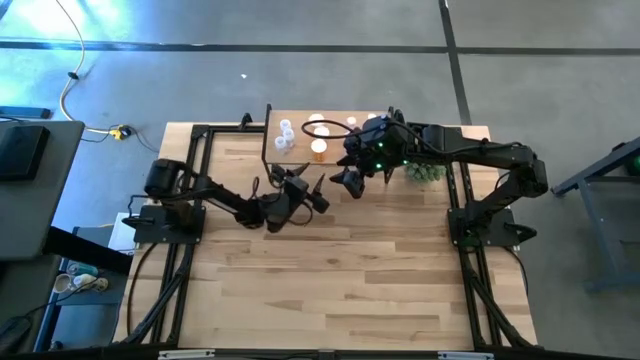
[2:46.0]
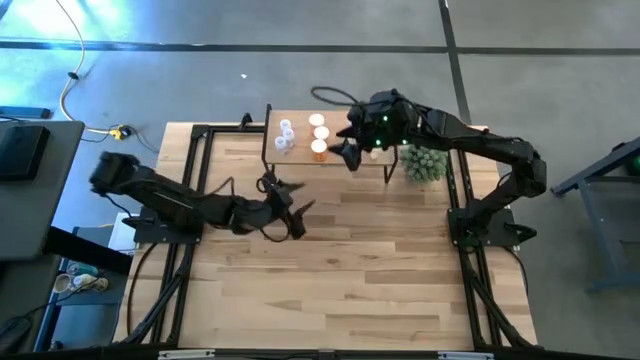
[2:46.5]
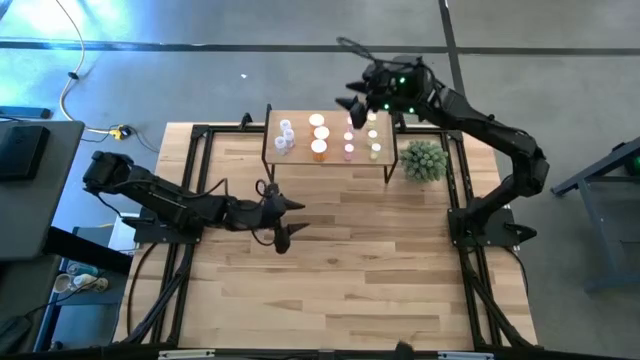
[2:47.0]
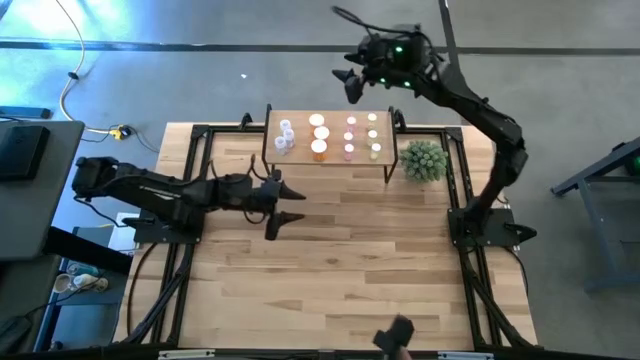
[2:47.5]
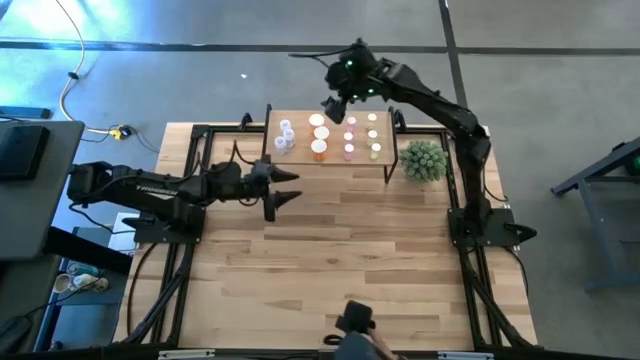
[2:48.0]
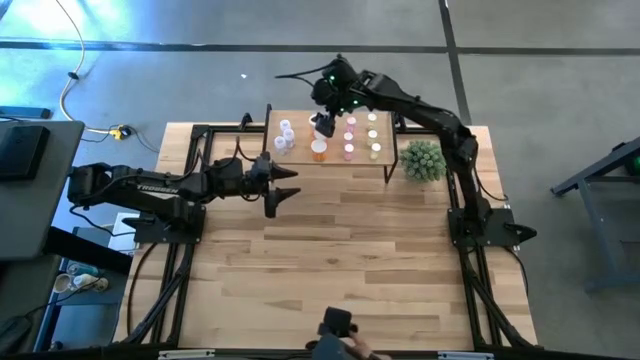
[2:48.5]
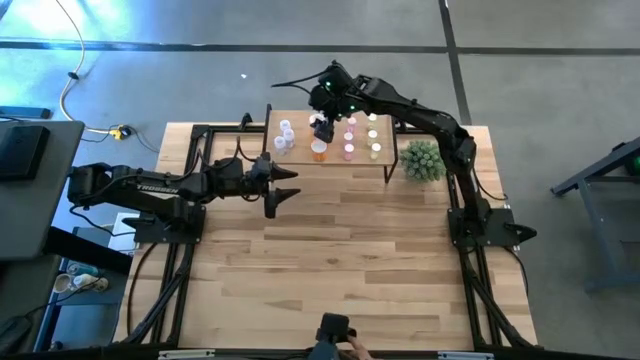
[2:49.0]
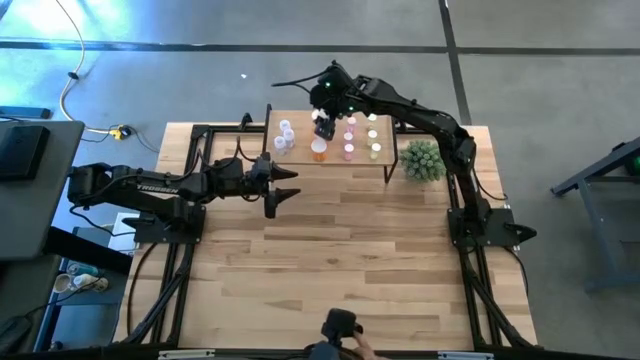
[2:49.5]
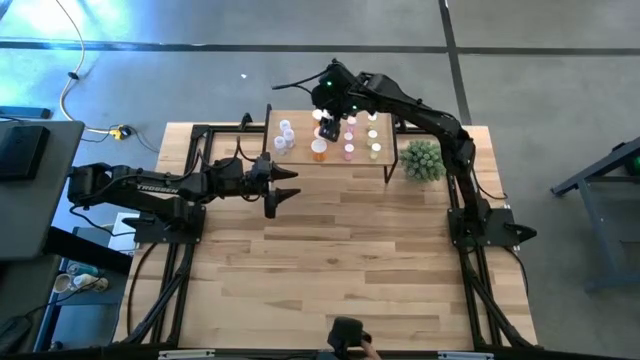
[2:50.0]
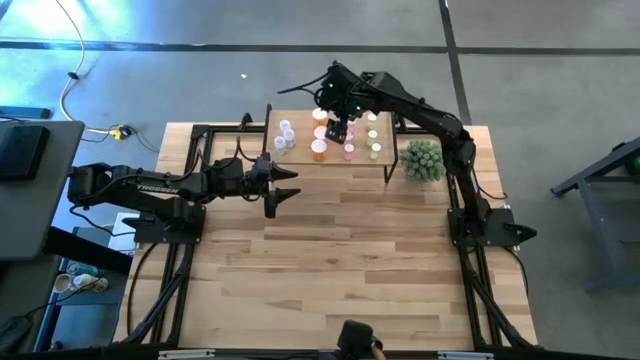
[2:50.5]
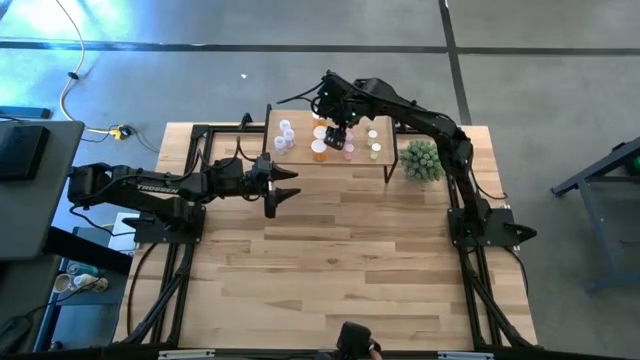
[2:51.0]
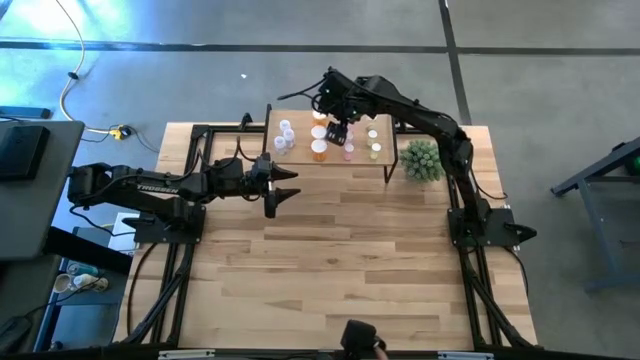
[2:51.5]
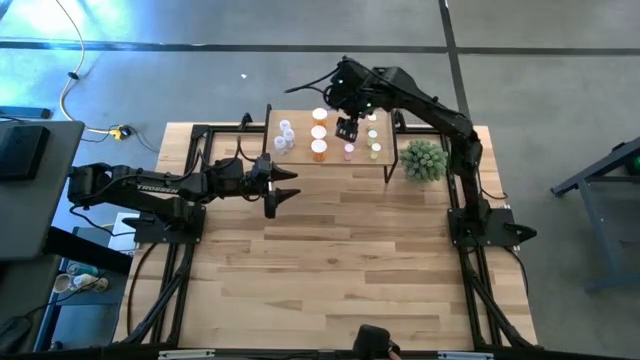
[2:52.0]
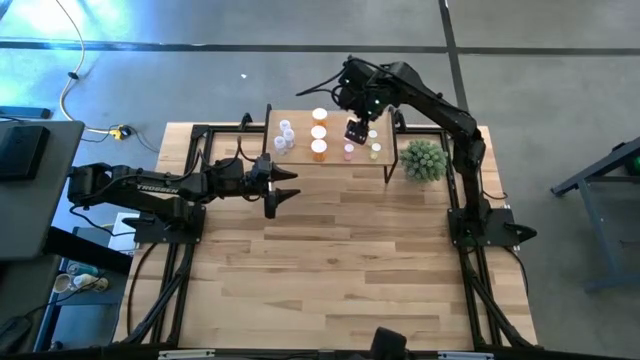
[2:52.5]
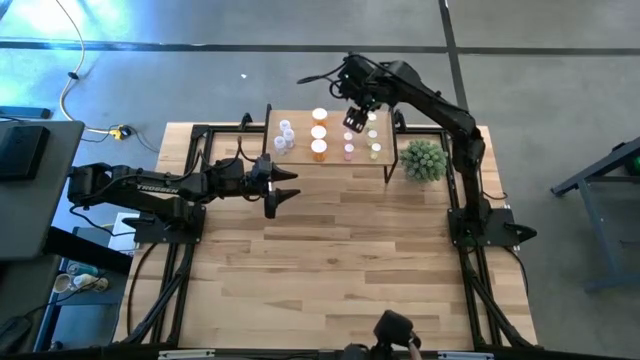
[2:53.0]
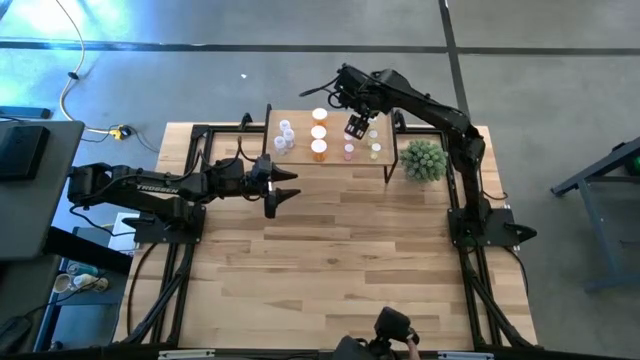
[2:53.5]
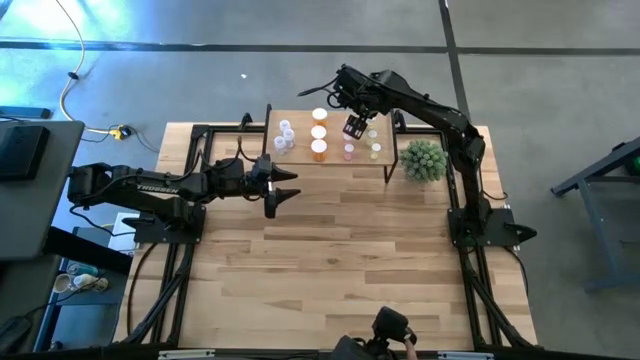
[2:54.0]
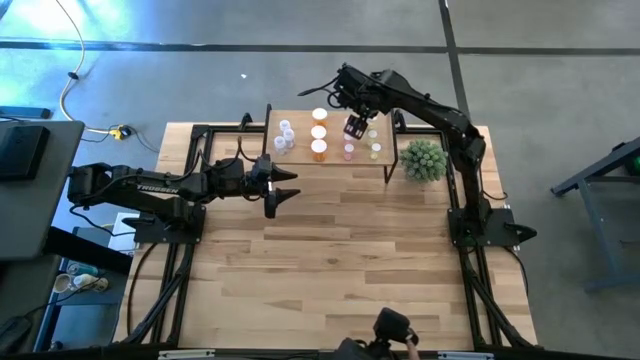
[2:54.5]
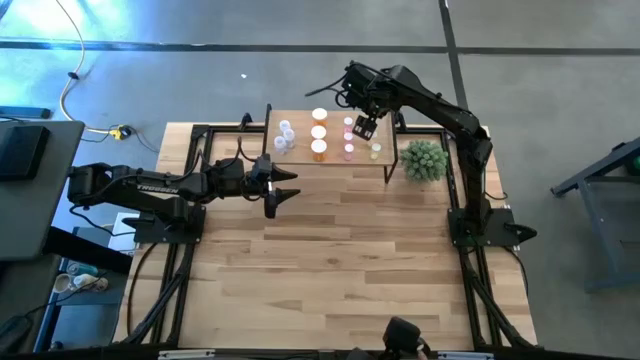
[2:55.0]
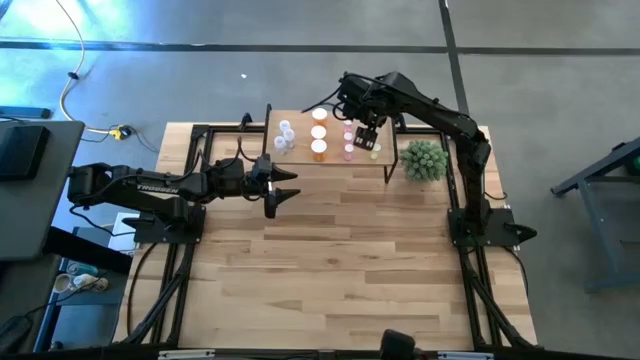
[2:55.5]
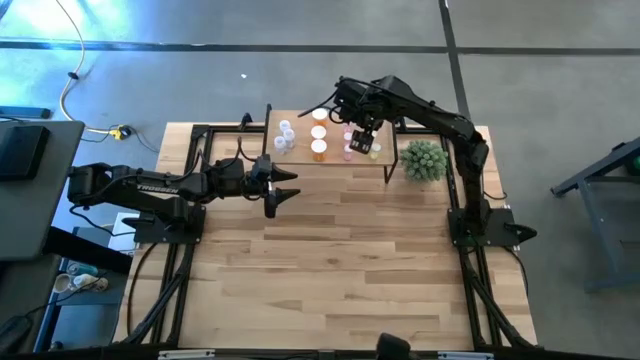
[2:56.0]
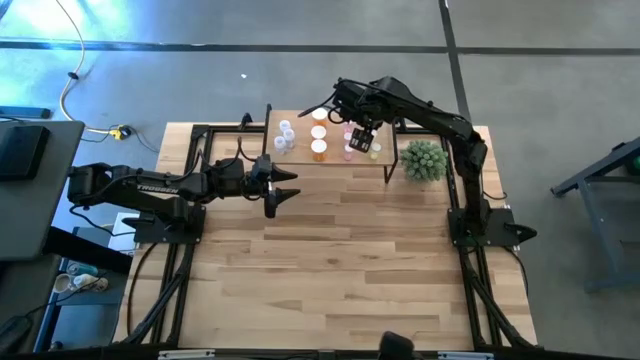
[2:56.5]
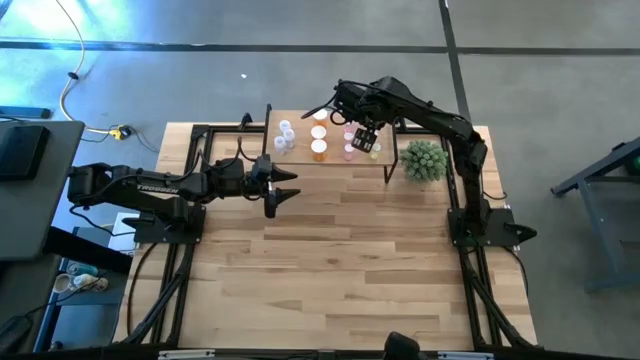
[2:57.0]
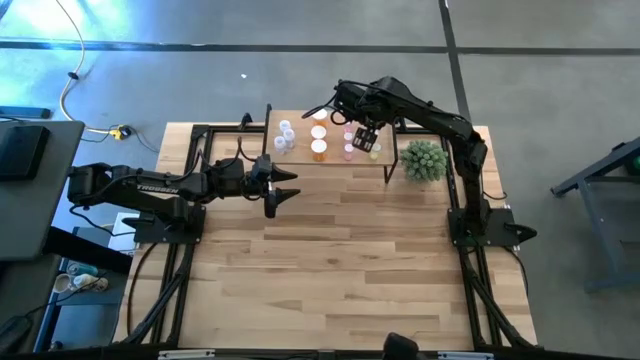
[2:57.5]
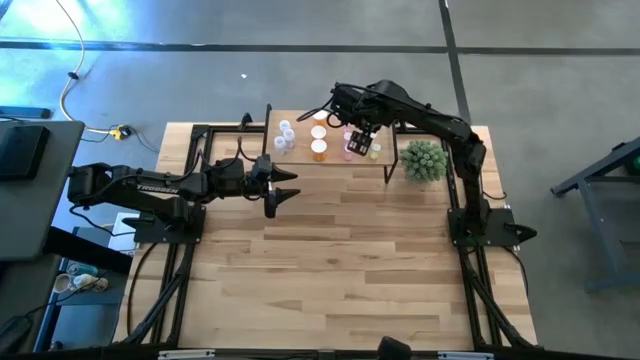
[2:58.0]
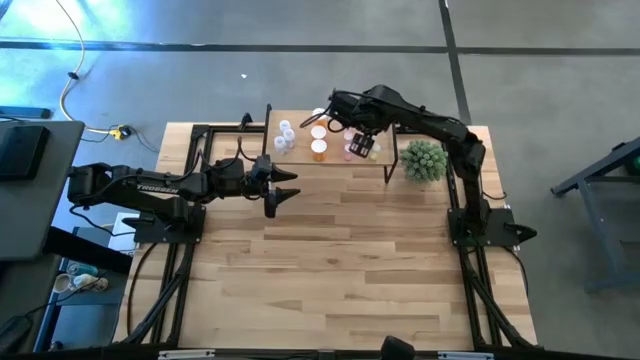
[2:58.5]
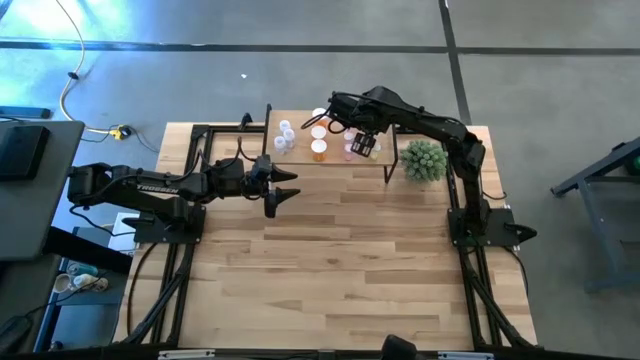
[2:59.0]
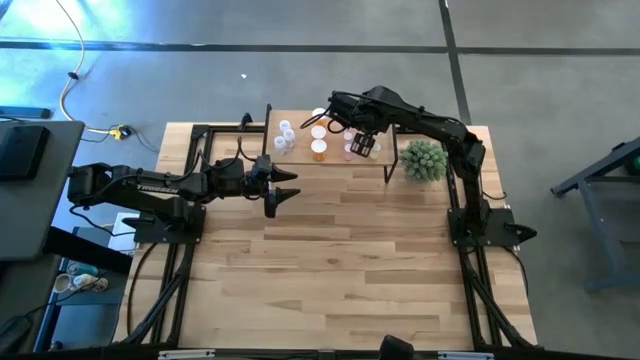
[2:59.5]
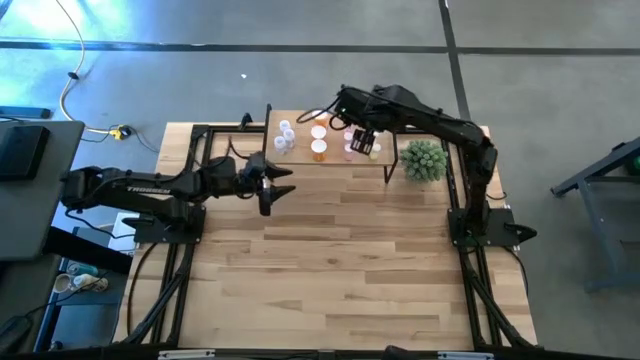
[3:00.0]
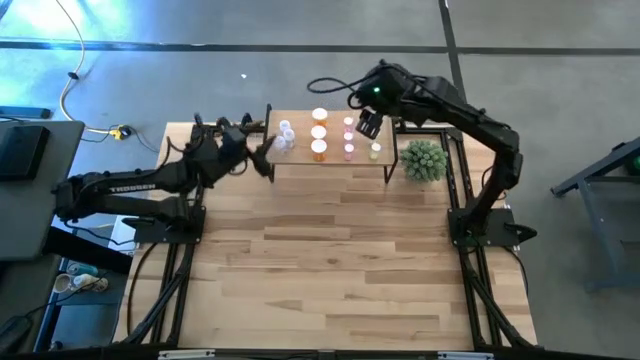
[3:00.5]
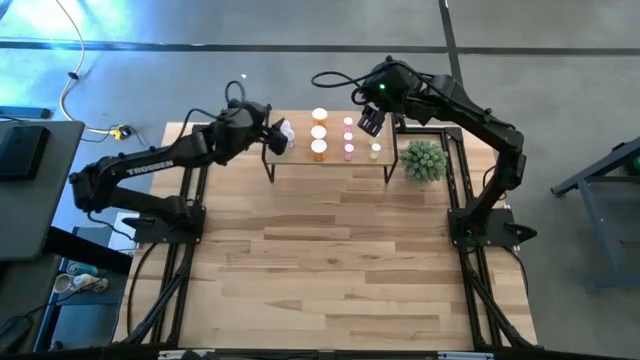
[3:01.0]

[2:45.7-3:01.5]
Task: Pick and place medicine bottles onto shelf by color
Adjust the colored pill bottles on the shelf

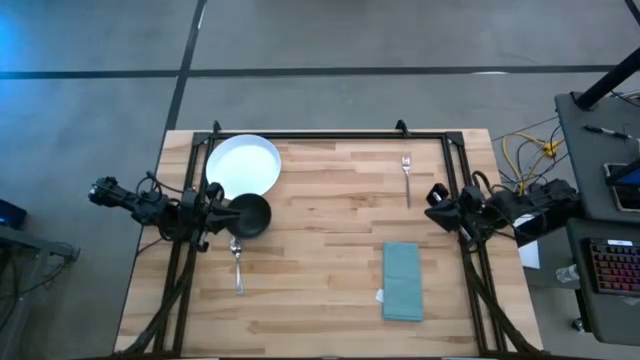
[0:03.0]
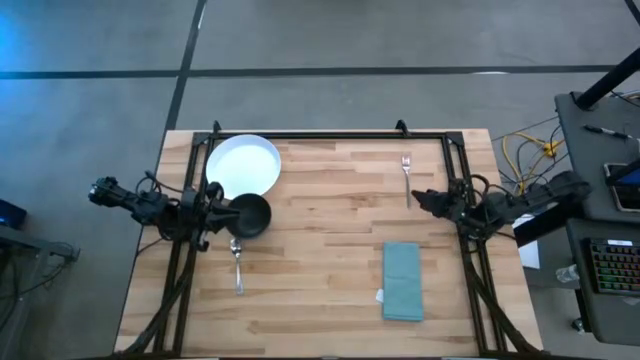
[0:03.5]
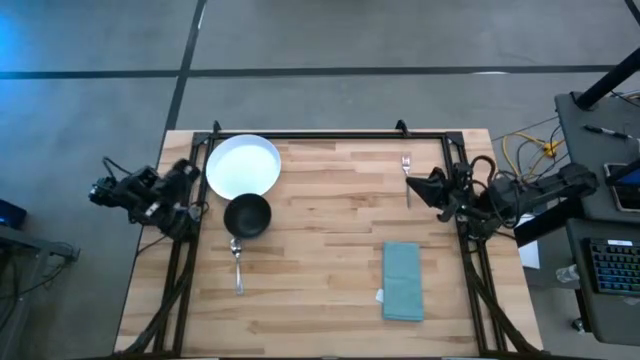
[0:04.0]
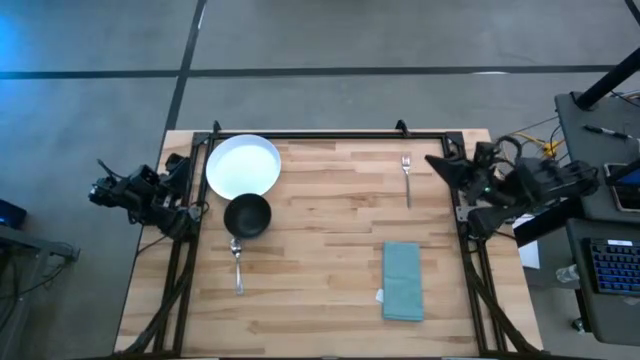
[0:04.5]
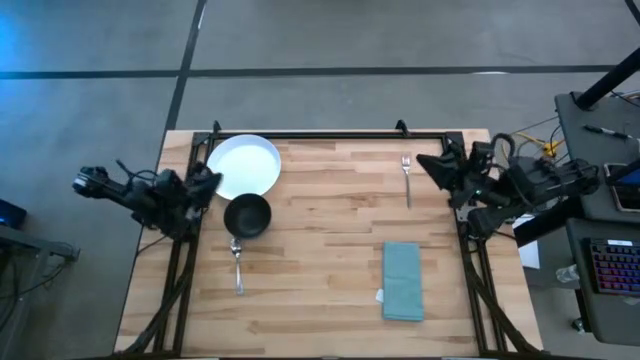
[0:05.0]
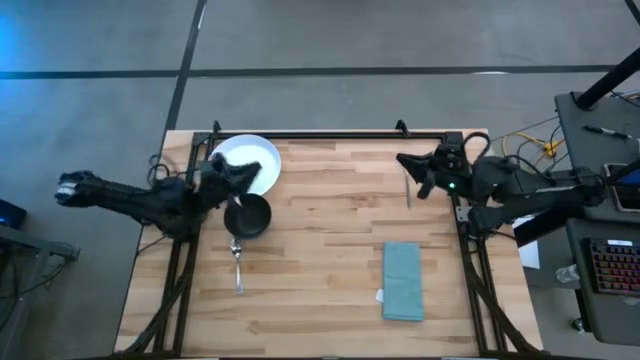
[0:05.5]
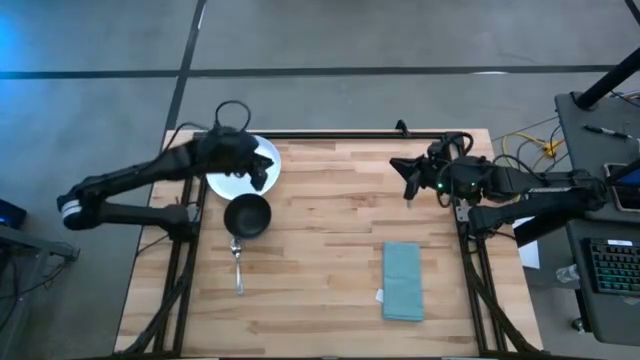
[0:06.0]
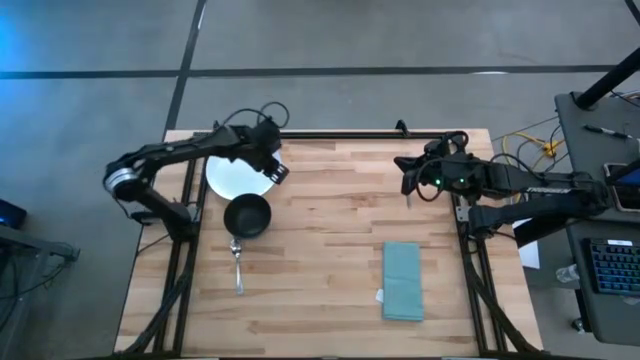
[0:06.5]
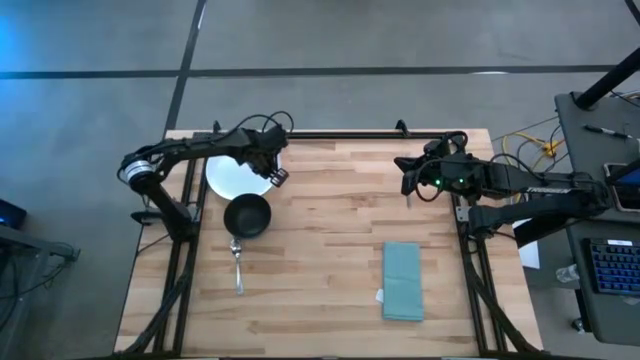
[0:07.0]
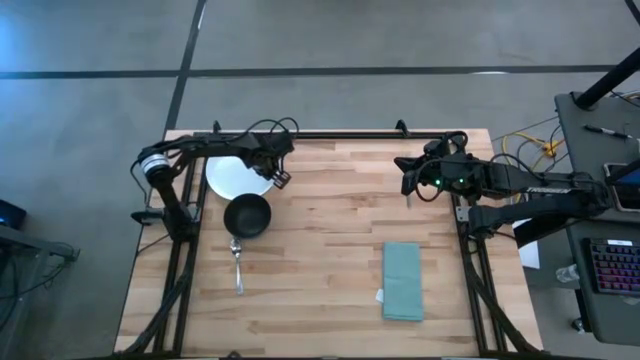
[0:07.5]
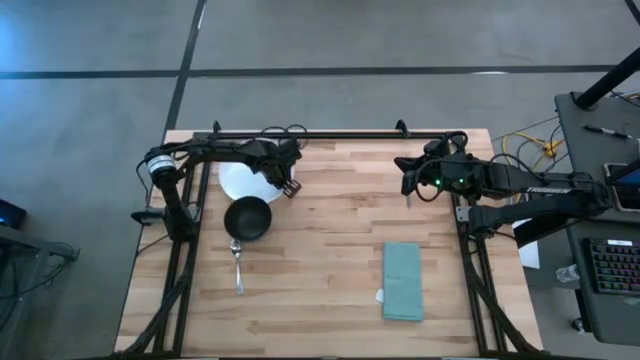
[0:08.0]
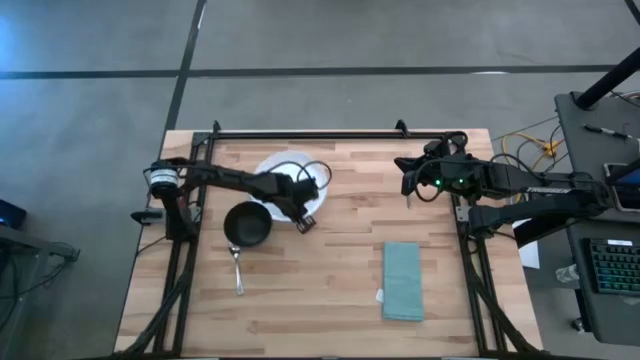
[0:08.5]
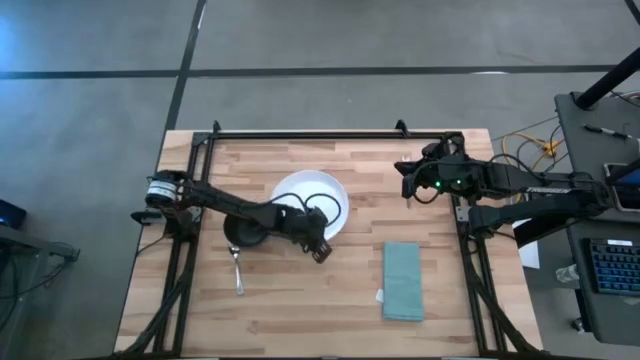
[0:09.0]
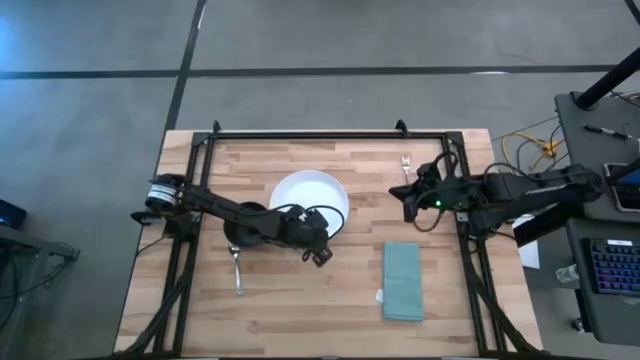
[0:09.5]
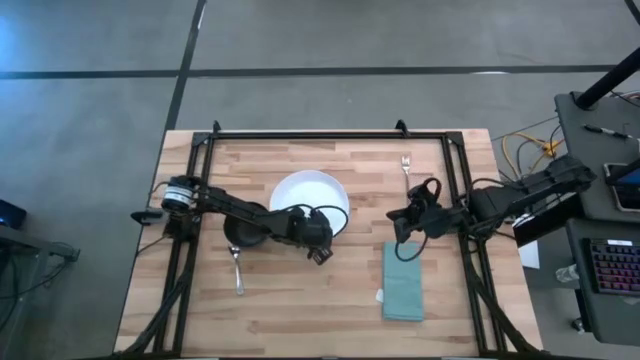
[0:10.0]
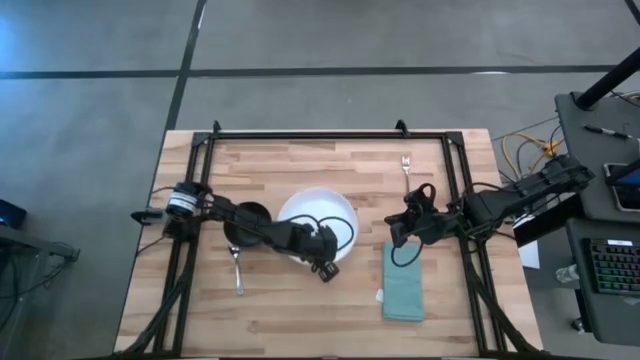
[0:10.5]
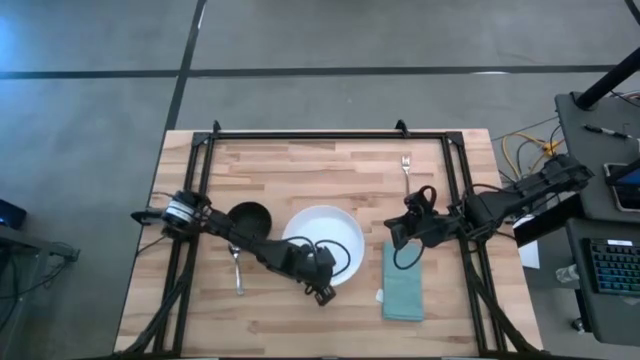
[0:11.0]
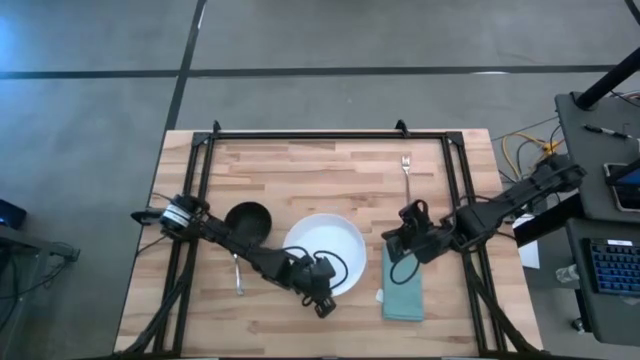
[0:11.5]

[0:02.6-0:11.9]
Task: Set table place
Move the white plate to the center of the table
